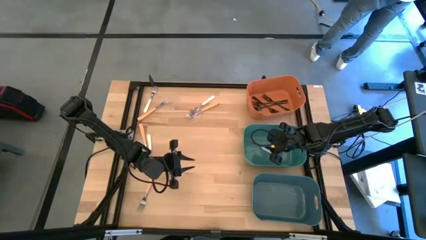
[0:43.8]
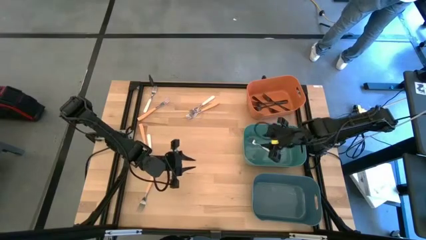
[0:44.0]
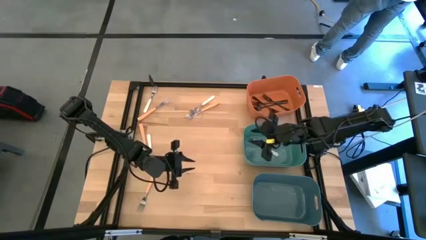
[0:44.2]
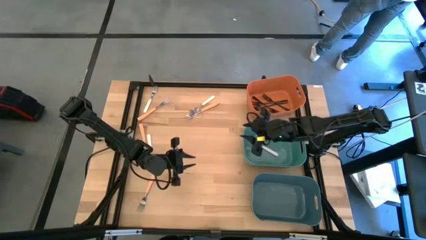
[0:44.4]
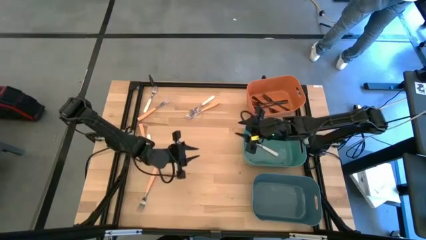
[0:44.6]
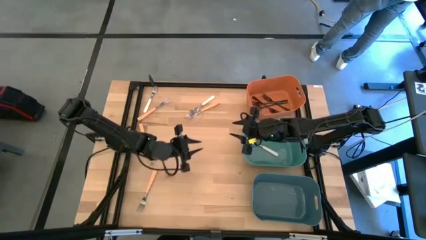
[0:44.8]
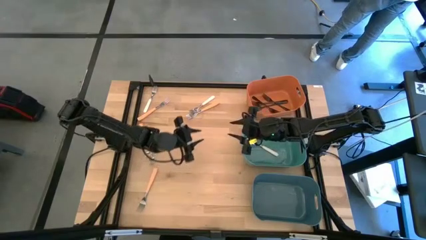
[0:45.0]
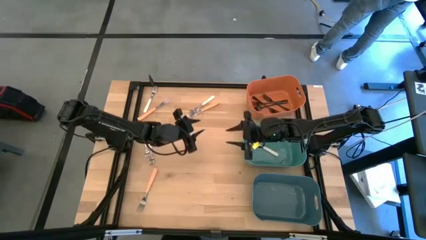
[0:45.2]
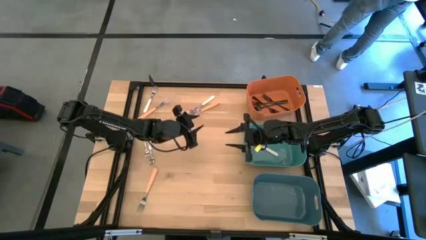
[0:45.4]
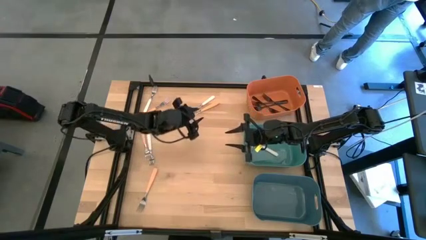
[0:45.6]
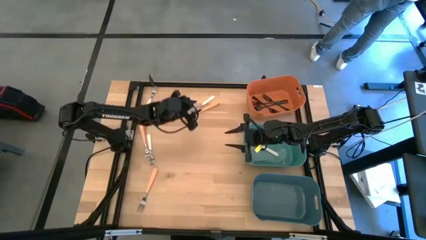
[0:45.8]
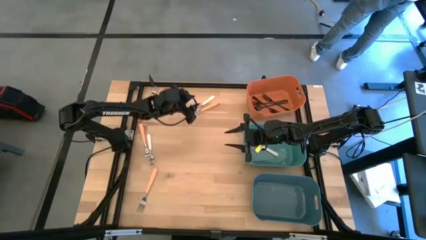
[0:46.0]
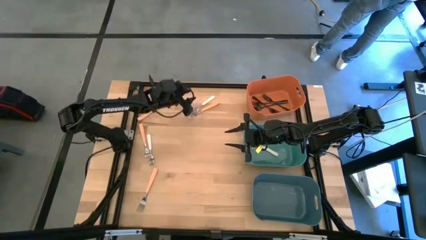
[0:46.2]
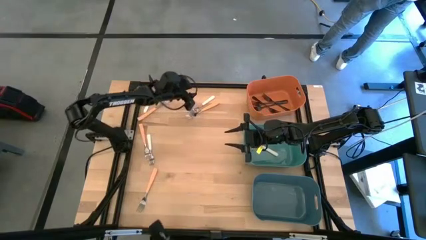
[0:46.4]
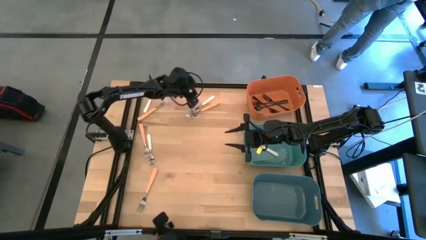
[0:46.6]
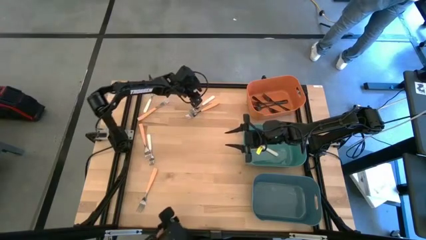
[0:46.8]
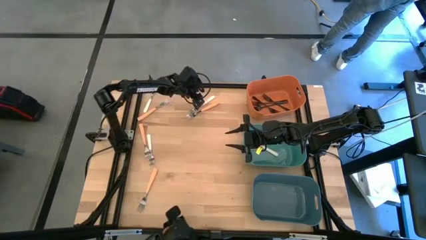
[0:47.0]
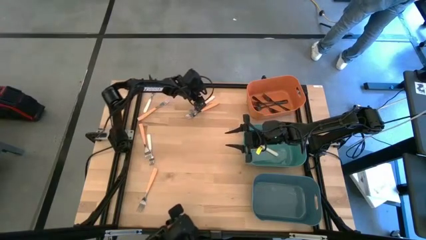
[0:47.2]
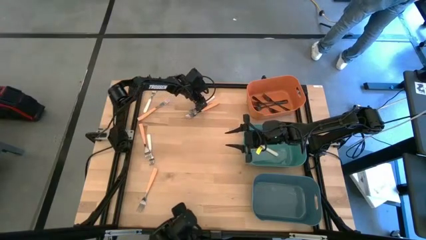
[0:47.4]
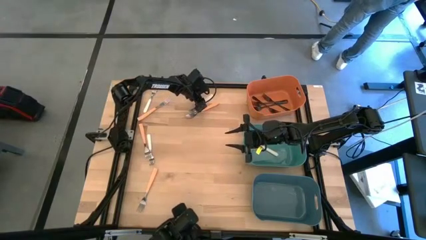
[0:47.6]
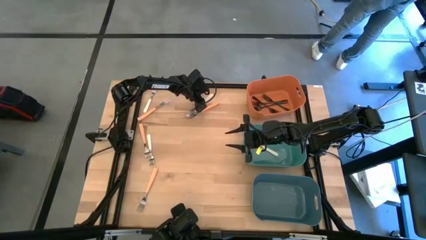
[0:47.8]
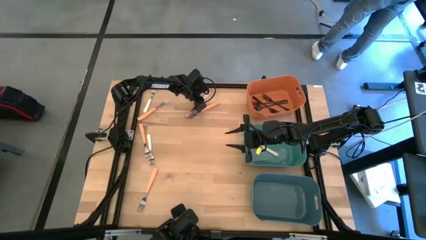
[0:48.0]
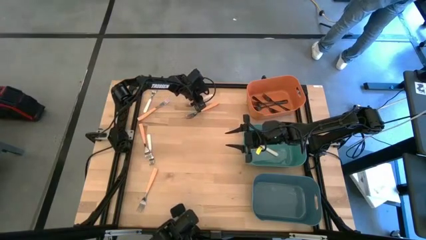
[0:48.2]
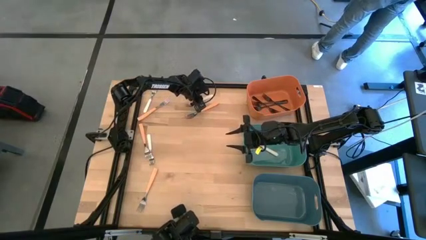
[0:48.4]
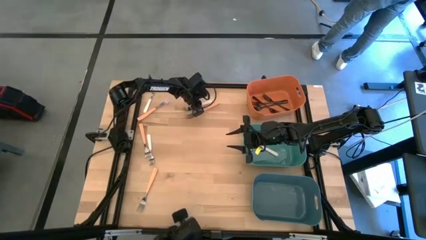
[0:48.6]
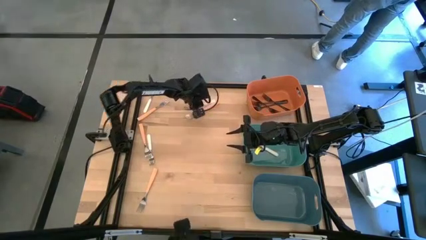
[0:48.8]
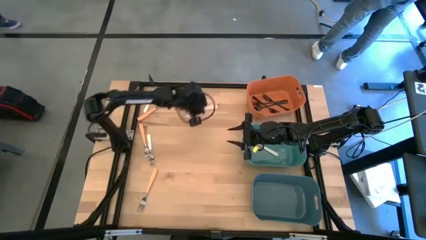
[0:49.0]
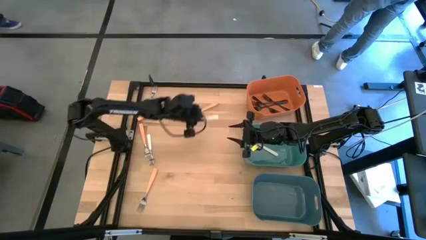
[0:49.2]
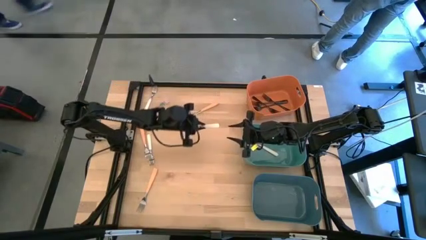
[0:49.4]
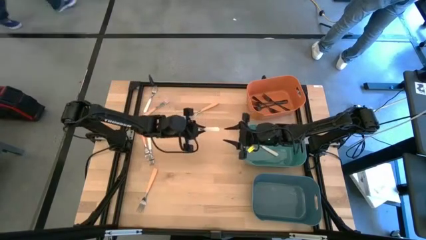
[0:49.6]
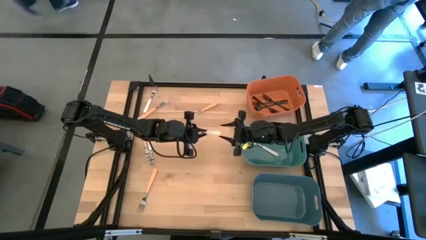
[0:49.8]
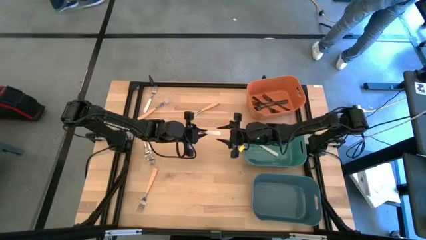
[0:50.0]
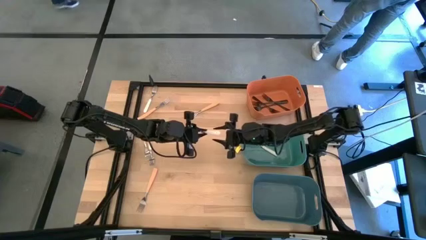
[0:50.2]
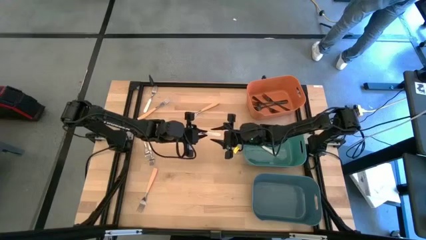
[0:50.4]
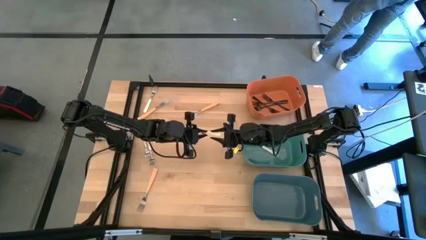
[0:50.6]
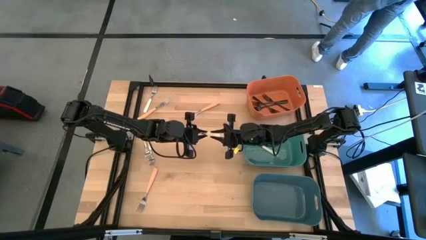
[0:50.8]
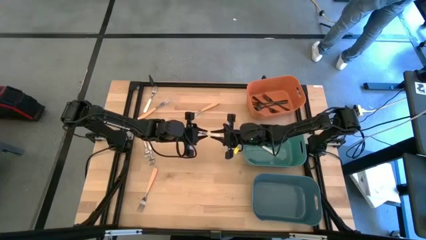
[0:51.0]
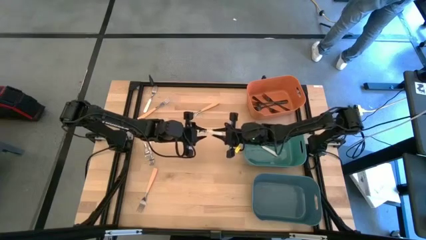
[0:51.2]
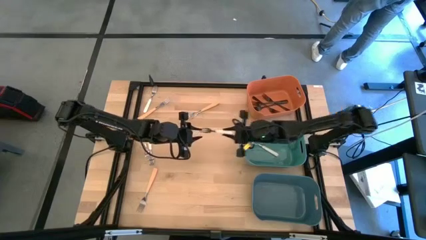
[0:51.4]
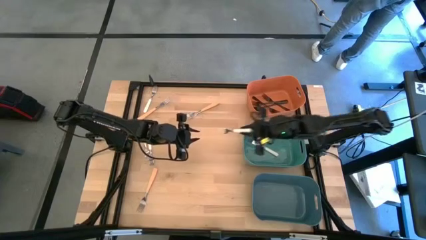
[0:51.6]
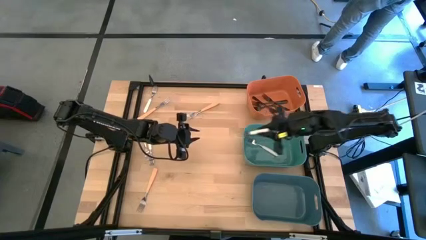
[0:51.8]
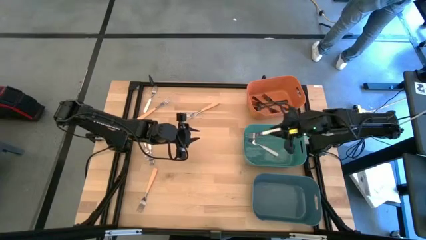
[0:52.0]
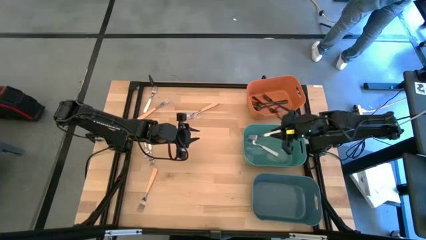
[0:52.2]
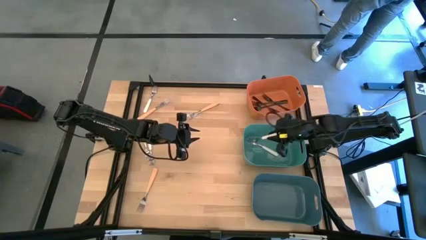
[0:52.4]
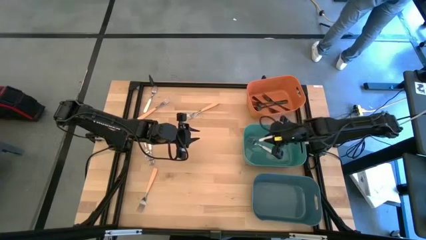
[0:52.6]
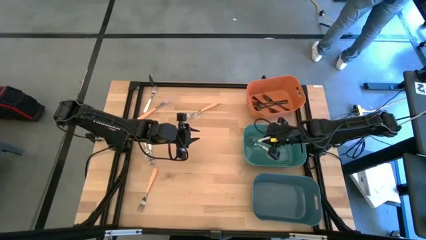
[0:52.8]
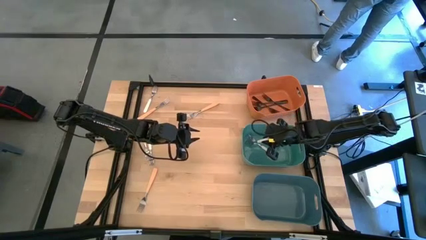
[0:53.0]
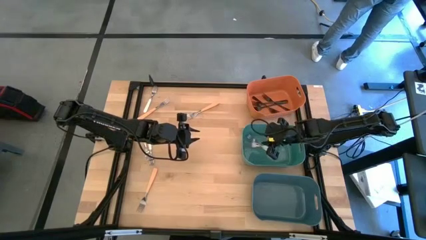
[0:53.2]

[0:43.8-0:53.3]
Task: Sort silverware by color (type)
Put the white fork into the green bin

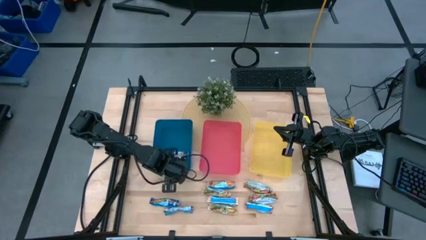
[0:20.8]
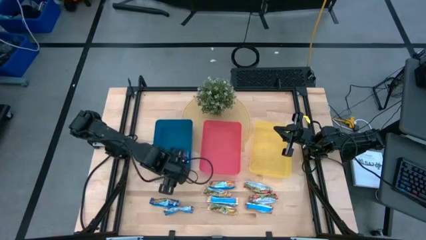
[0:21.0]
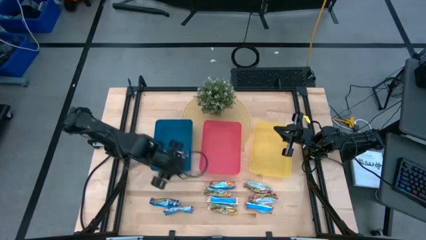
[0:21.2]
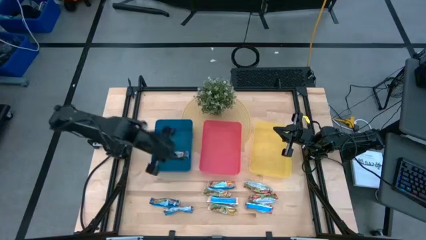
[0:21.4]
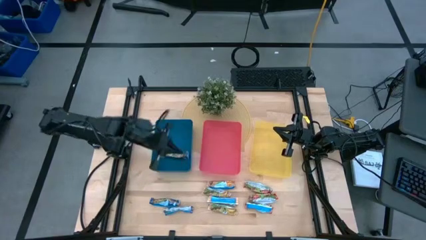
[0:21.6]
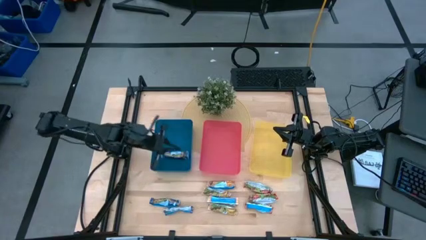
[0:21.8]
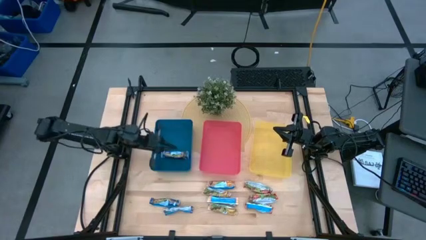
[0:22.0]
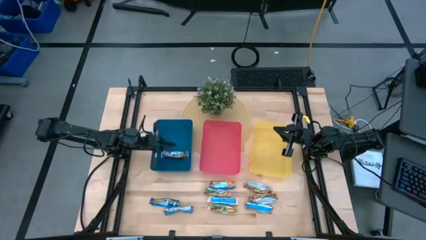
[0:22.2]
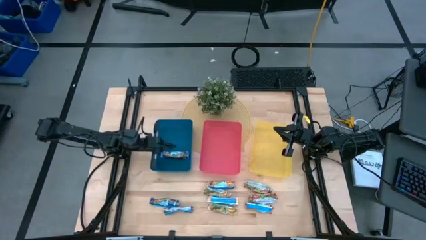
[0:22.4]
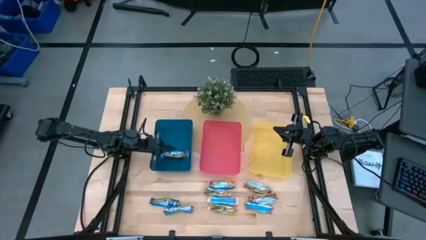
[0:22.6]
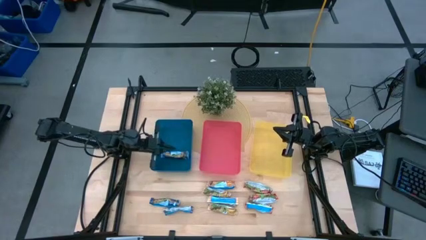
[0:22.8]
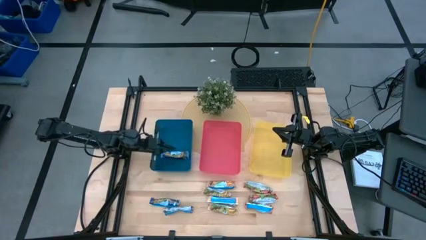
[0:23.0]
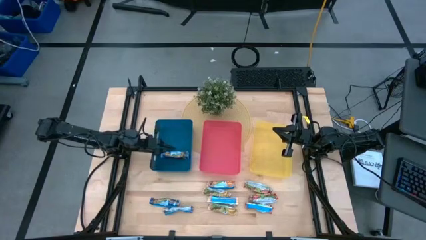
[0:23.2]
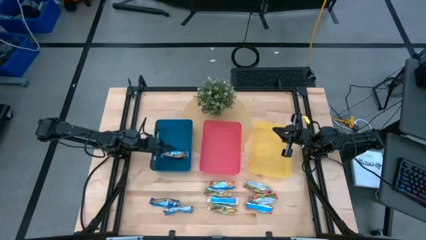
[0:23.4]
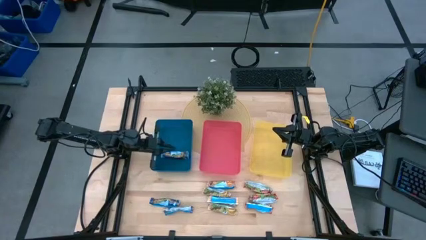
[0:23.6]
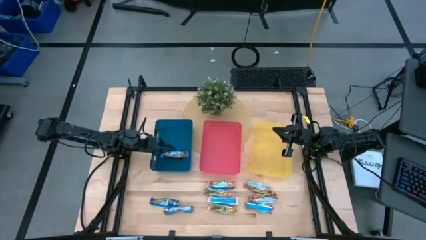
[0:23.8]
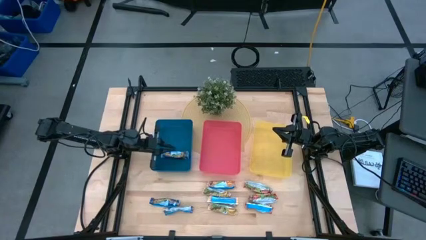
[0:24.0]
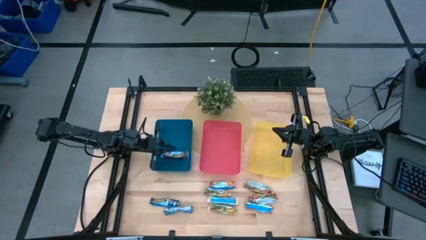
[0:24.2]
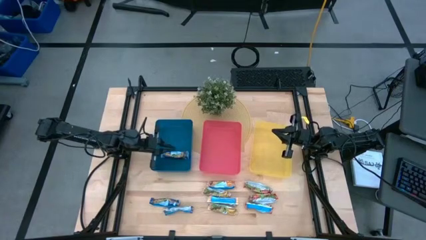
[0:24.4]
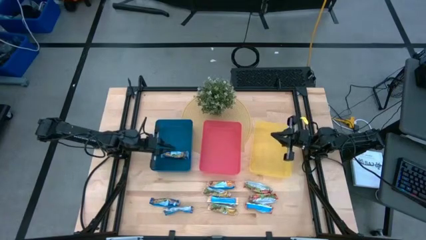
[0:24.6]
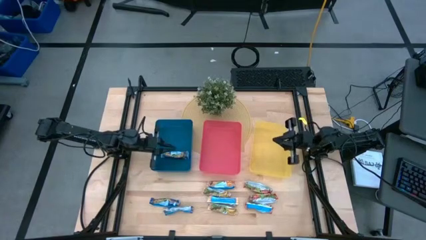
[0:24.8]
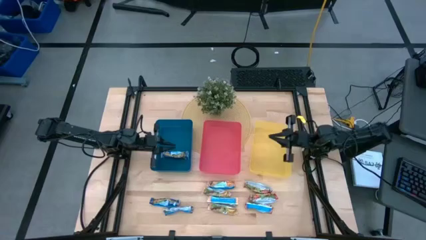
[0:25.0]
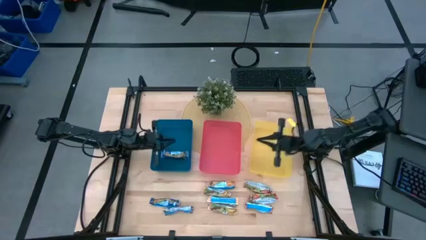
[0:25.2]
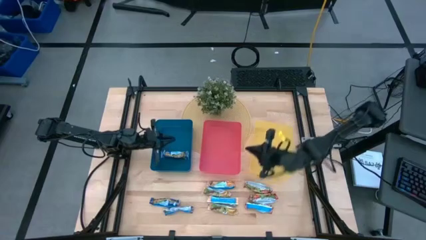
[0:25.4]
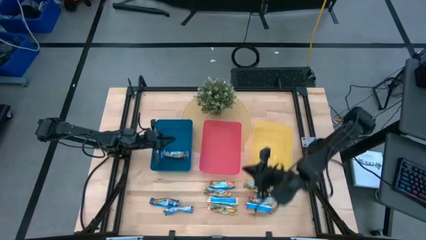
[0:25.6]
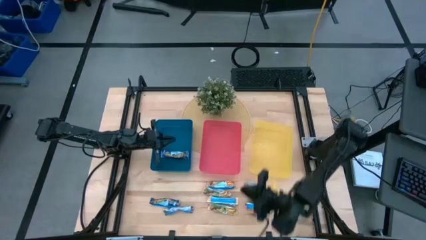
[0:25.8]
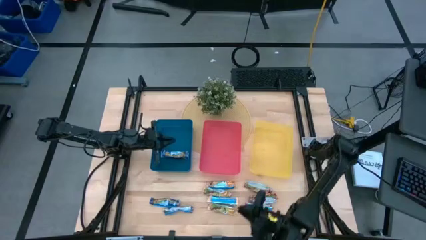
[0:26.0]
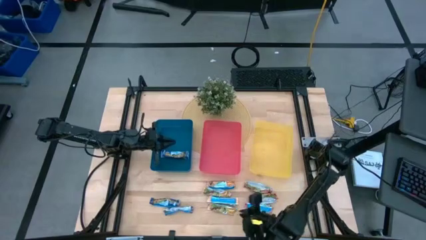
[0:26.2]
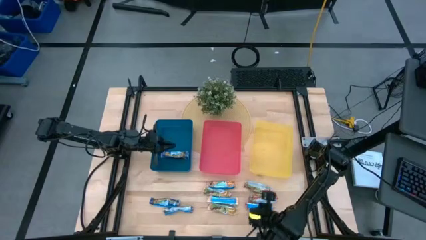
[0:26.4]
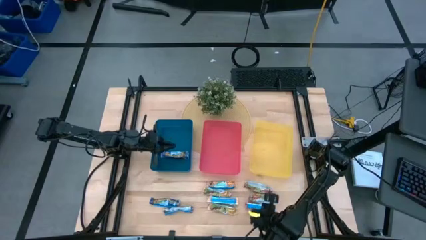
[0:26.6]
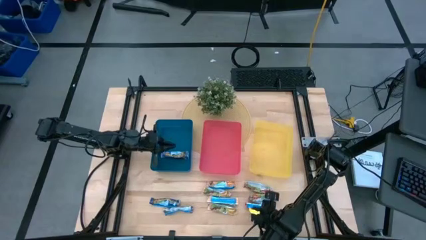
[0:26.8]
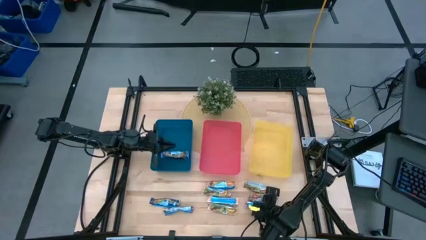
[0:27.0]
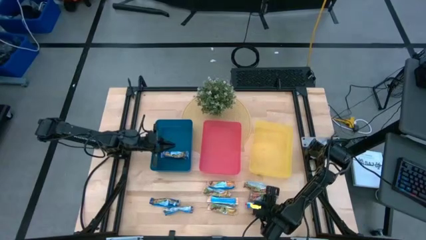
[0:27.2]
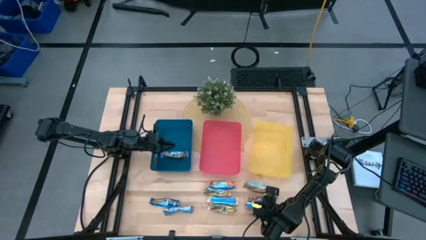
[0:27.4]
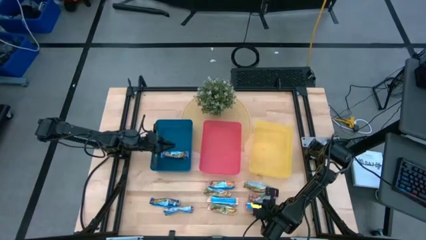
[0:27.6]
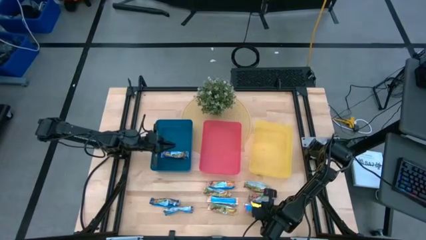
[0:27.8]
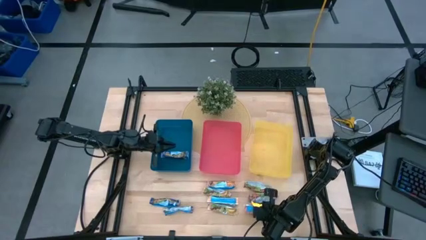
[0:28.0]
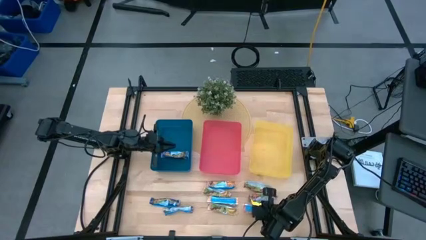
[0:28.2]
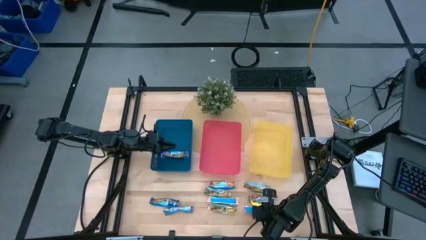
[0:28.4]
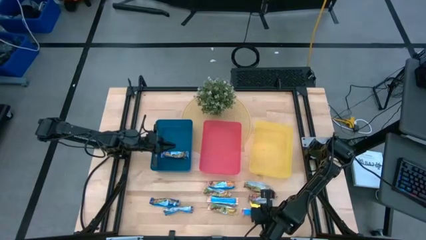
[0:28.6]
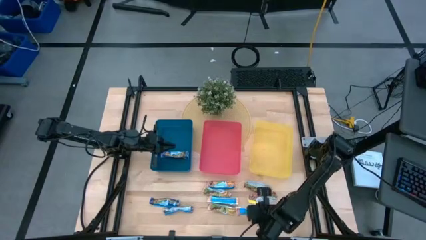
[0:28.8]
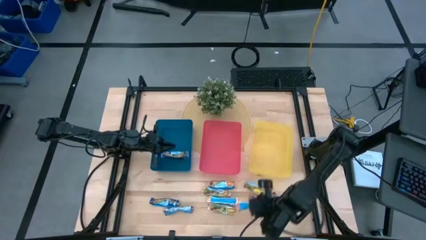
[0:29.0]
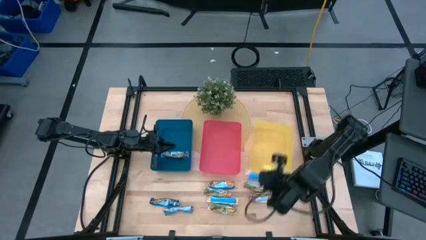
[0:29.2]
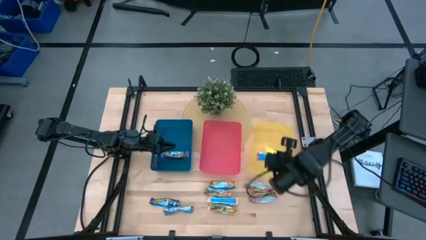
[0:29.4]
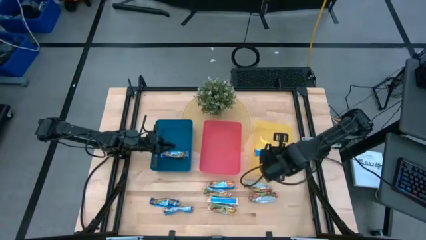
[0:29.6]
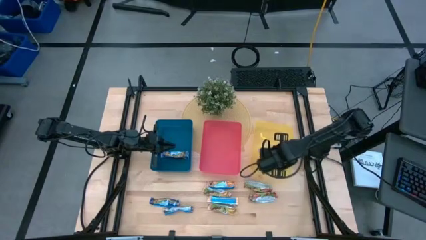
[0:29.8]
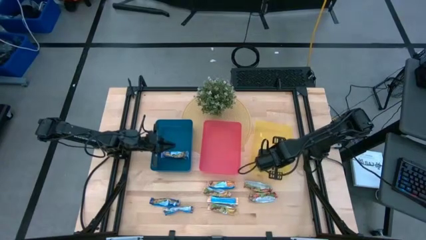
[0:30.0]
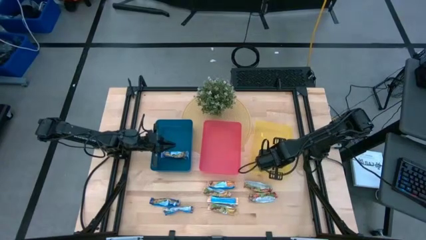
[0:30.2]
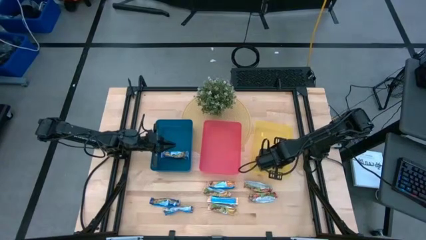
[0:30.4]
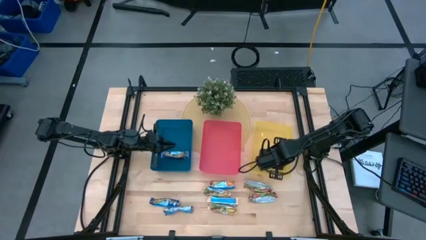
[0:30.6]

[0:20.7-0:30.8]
Task: Pick and place Granola Bars by type
Put the bottom red granola bar into the yellow bin
